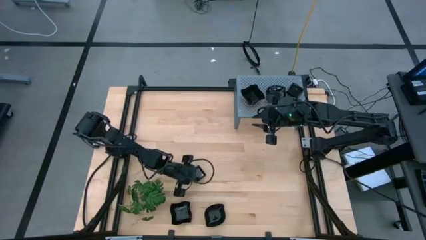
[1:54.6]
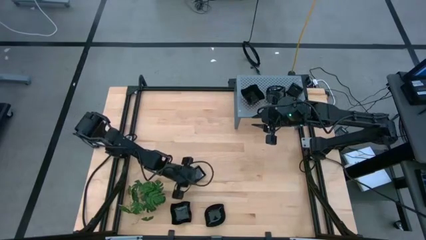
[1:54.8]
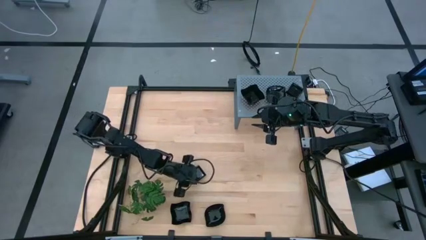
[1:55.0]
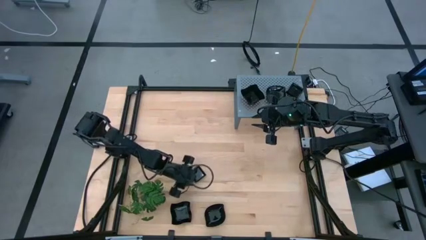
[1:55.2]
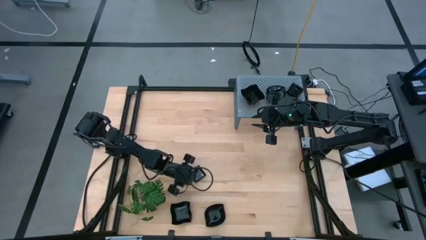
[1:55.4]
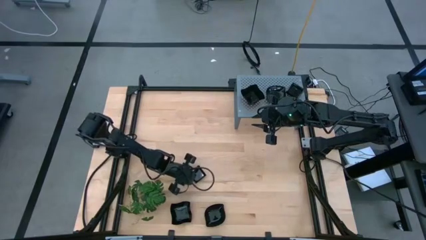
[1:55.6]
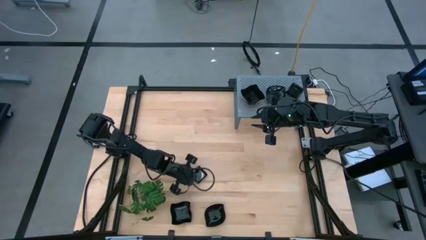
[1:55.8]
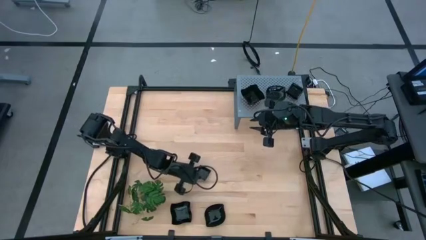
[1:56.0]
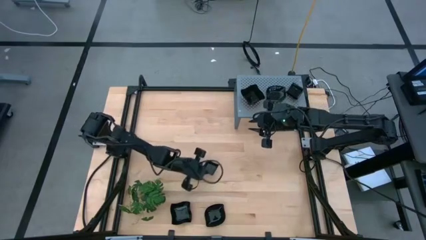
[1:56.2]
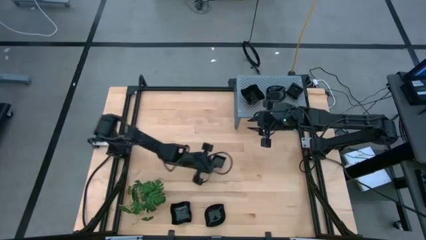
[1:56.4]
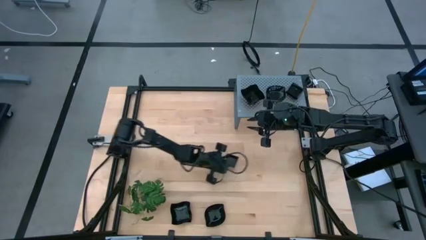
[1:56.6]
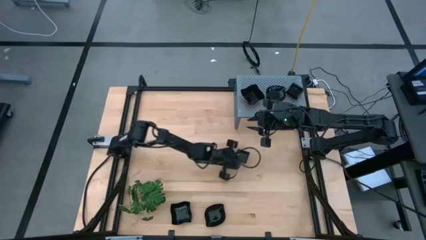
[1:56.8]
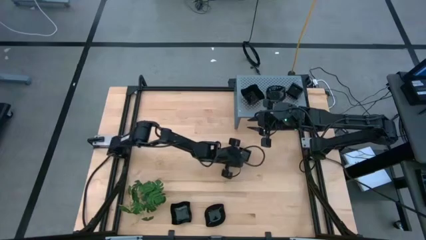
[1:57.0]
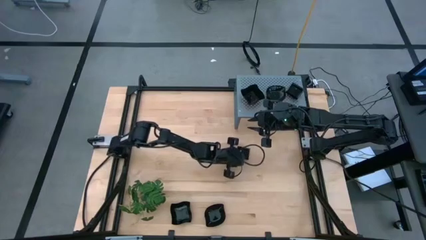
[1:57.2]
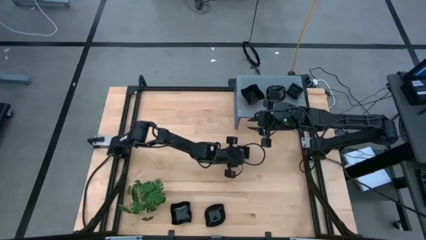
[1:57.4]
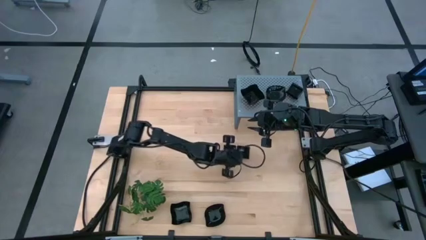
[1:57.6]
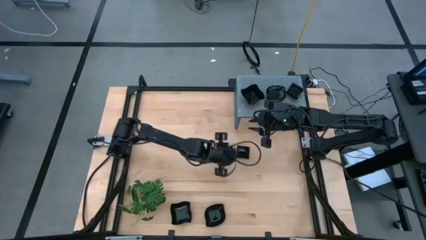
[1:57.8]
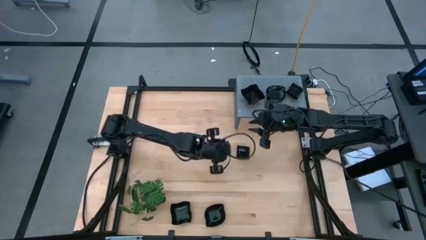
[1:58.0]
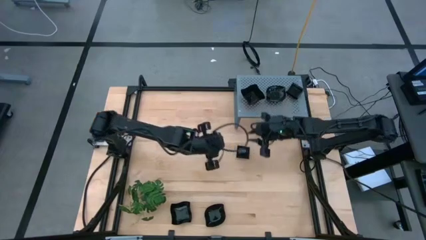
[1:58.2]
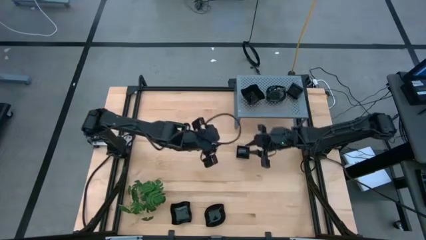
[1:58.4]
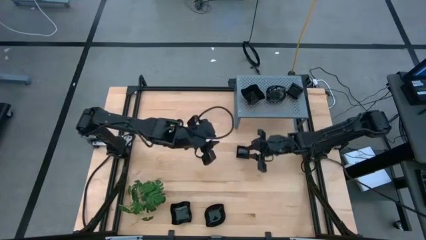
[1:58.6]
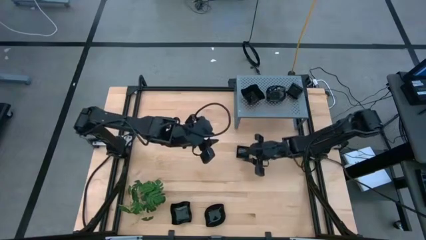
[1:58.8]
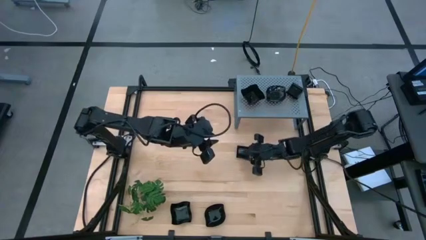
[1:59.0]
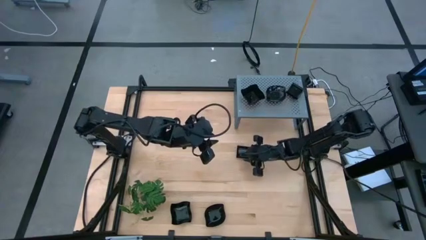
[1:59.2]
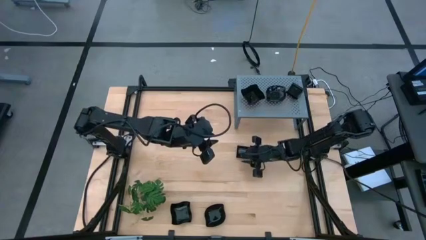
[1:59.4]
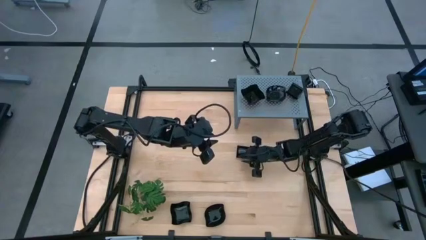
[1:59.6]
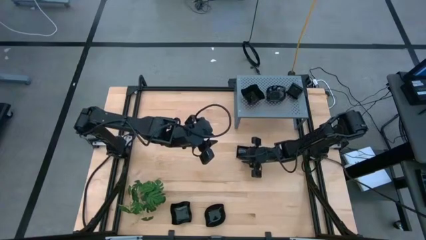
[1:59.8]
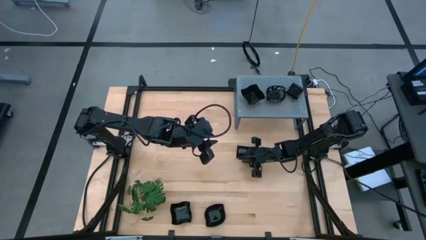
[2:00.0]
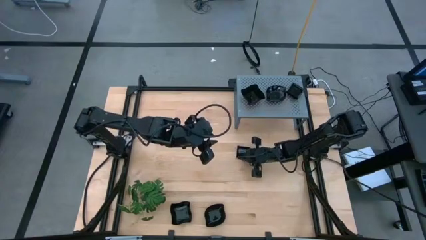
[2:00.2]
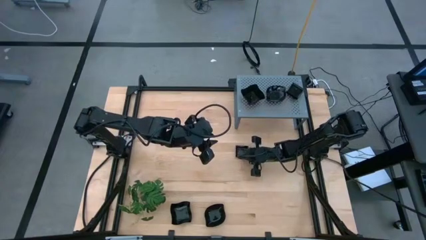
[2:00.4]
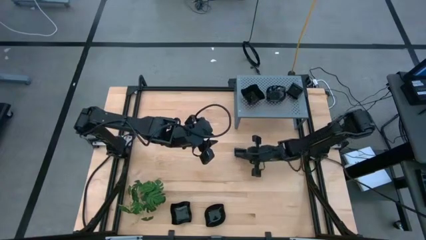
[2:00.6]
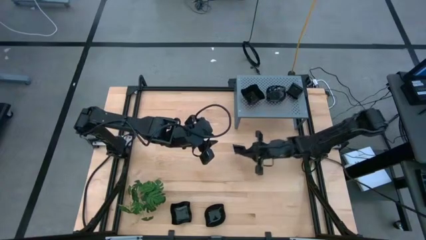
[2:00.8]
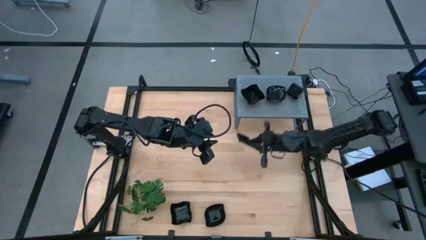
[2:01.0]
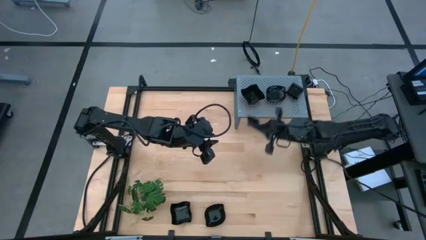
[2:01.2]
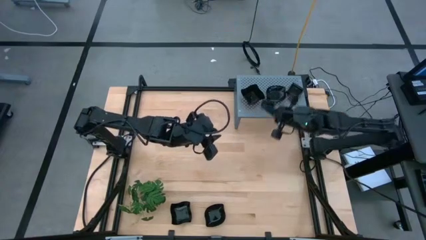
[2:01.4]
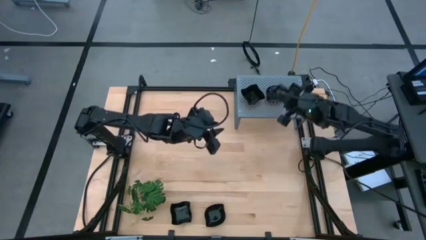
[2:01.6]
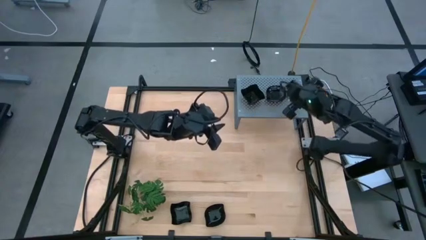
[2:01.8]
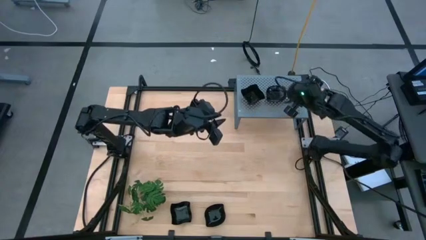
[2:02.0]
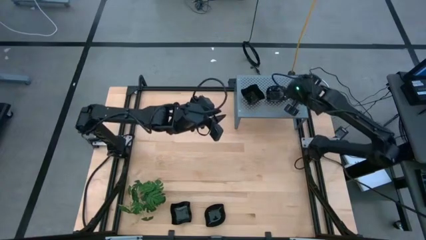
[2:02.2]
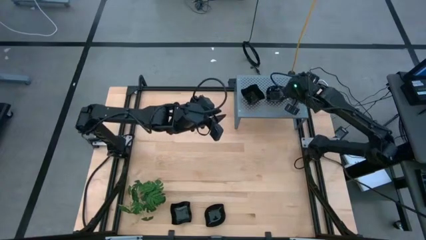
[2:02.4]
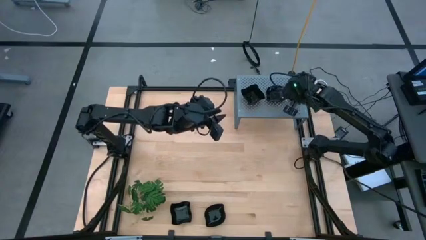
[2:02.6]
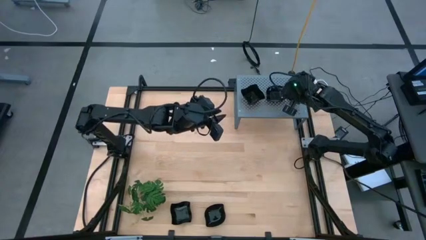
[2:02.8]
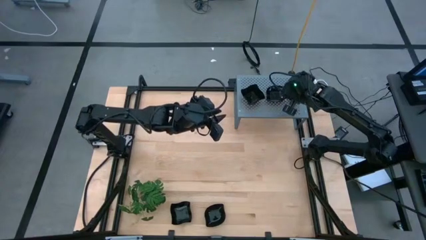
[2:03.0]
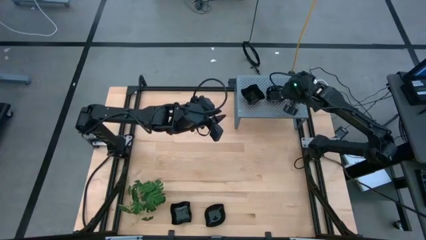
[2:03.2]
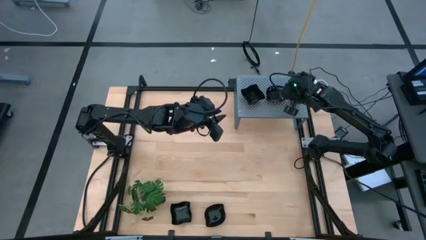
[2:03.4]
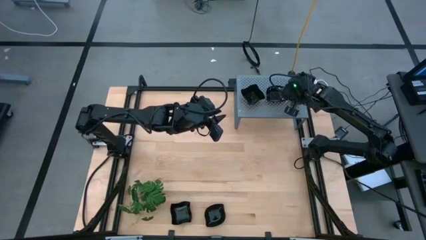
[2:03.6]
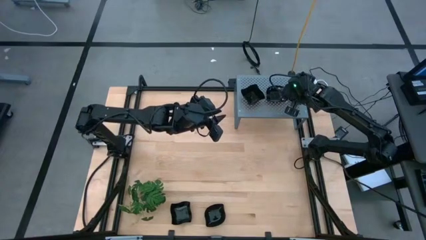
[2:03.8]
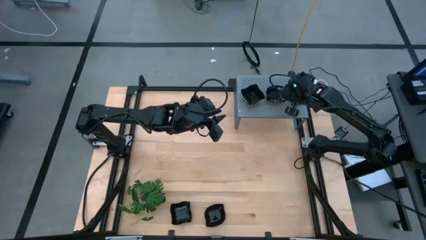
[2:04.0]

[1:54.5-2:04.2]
Task: Pick & Place Mini shaped plates
Stack the black square plate on top of the black square plate on the shelf

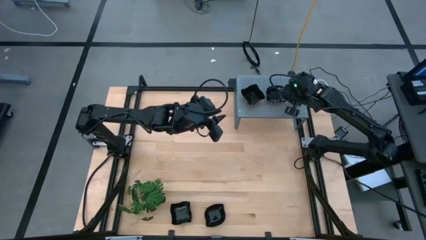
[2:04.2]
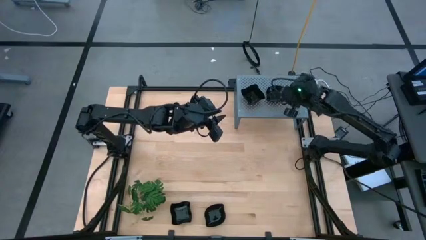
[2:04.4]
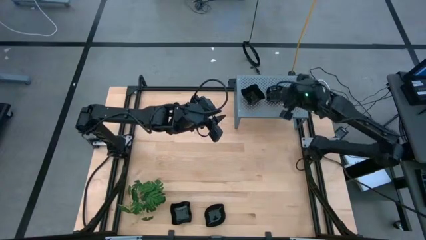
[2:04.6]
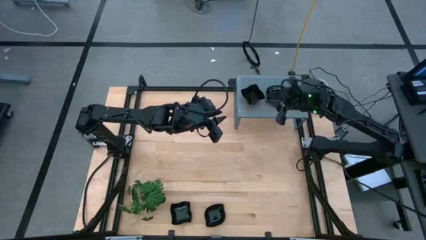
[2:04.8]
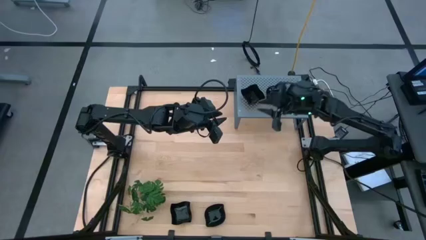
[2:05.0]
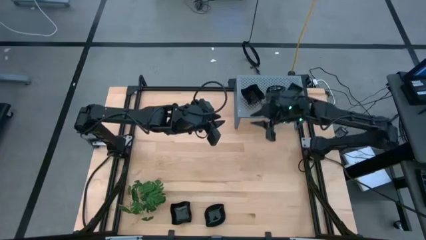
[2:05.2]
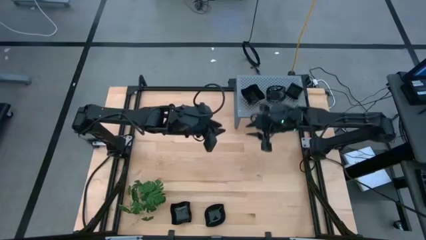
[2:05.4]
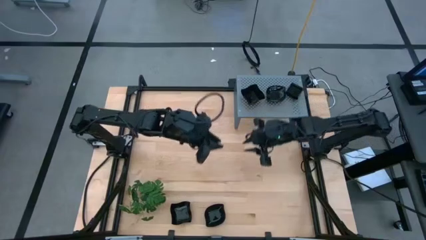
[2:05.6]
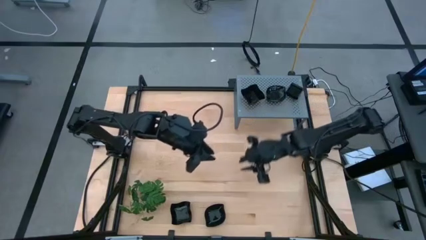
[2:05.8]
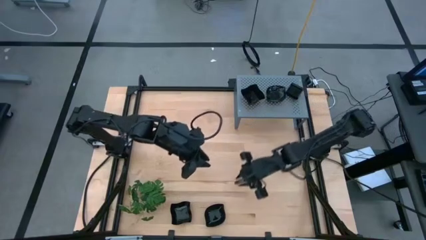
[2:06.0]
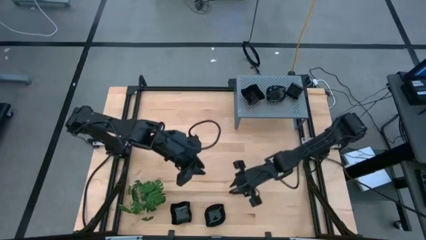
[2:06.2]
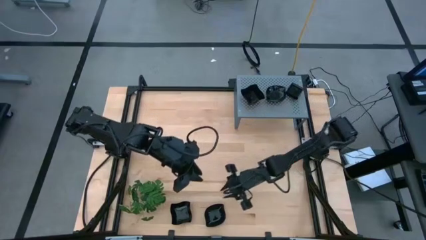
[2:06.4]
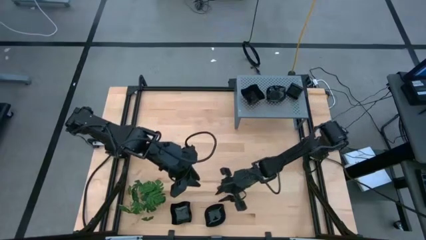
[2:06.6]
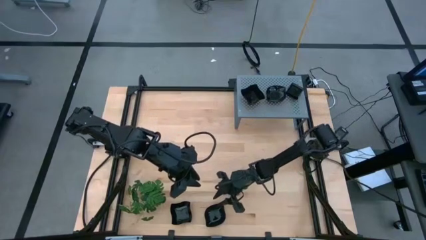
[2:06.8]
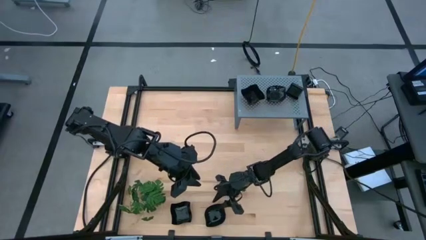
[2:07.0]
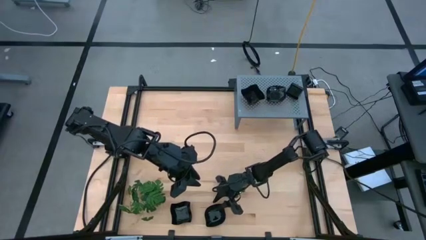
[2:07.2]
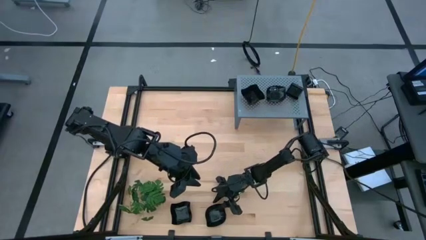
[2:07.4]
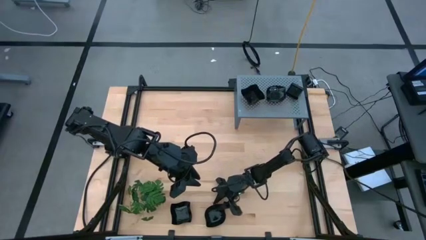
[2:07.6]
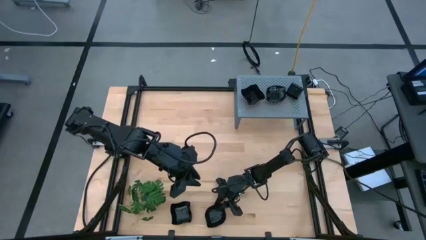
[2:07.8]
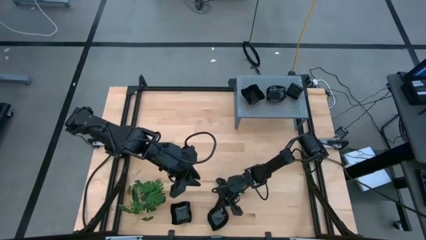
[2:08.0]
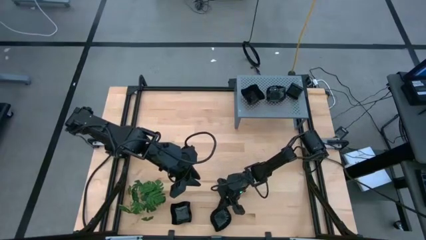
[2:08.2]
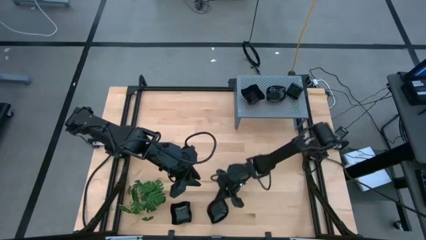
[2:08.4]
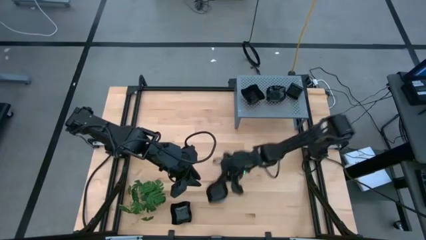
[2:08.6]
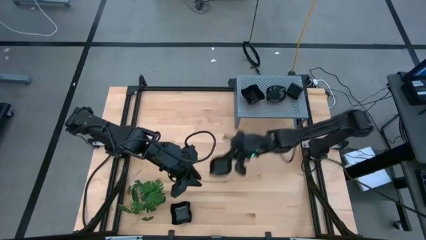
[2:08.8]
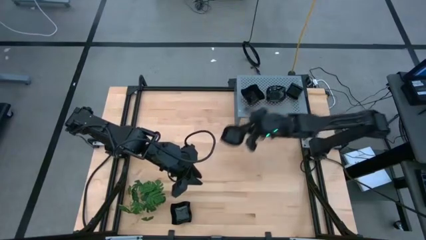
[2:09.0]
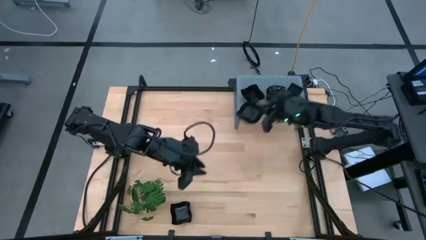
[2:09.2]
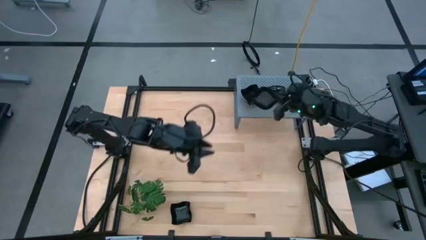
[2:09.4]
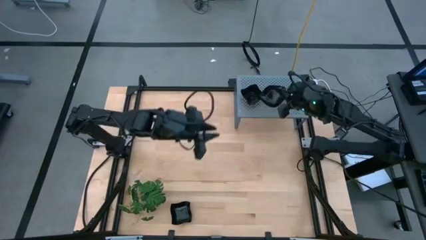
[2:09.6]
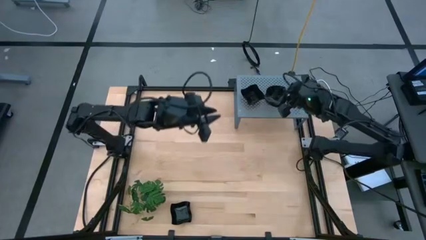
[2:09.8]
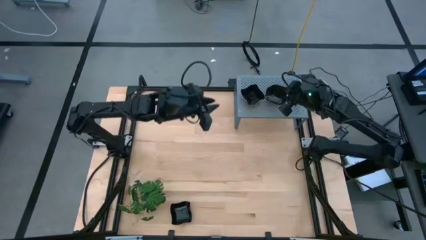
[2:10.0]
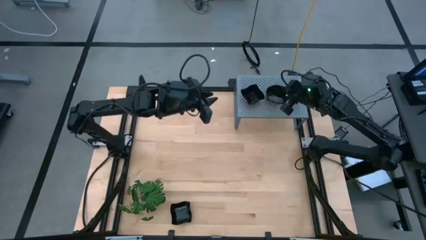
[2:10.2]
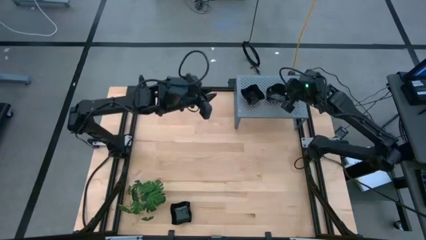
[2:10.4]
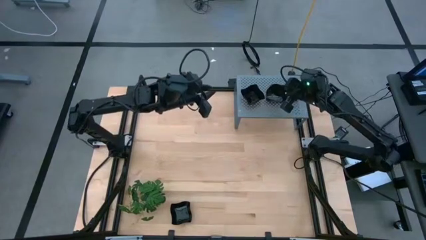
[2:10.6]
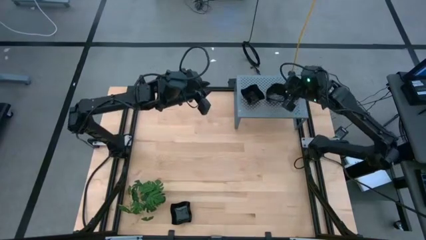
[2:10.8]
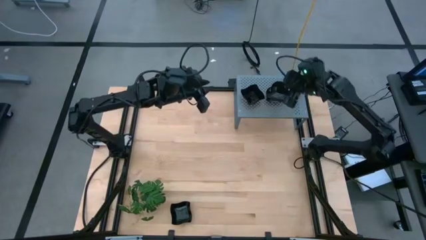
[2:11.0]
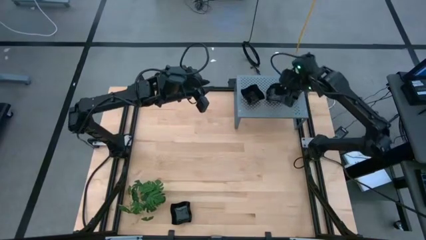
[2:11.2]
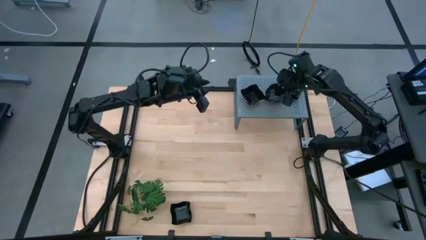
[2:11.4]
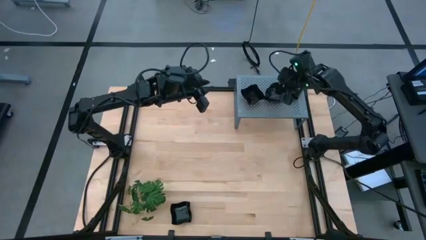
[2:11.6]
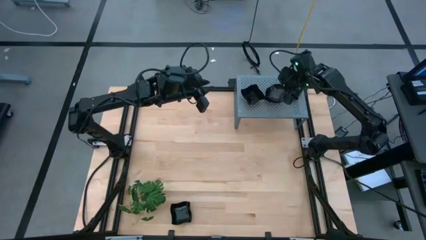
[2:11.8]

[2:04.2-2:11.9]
Stack the black leaf-shaped plate on top of the black leaf-shaped plate on the shelf
